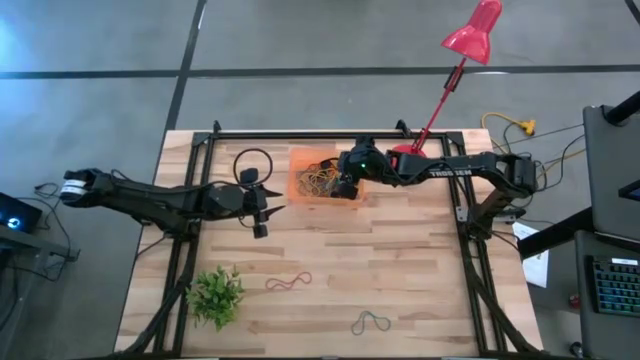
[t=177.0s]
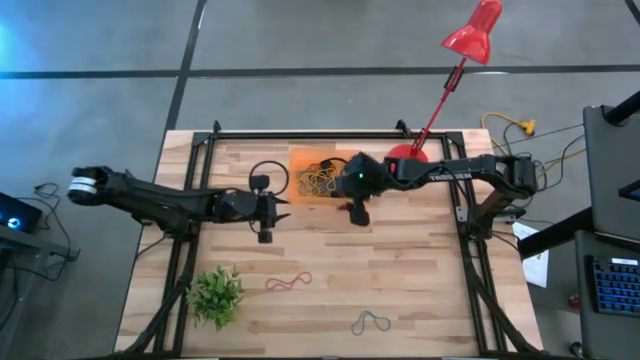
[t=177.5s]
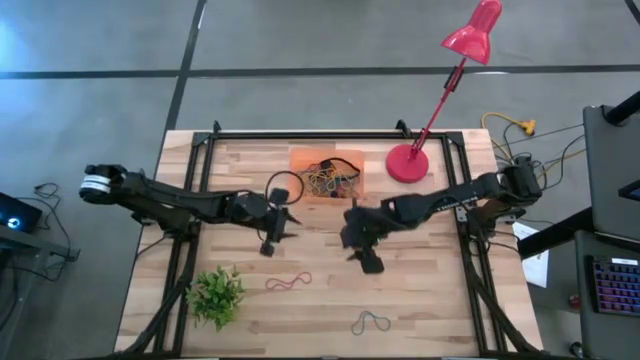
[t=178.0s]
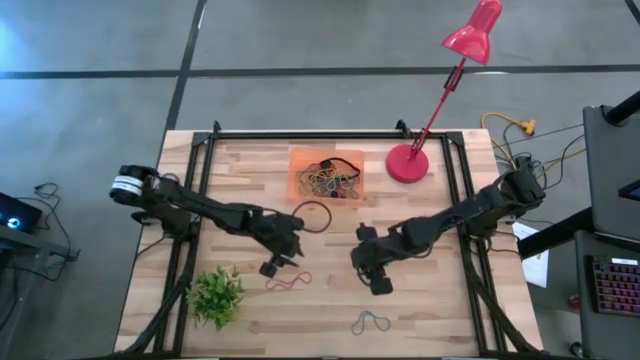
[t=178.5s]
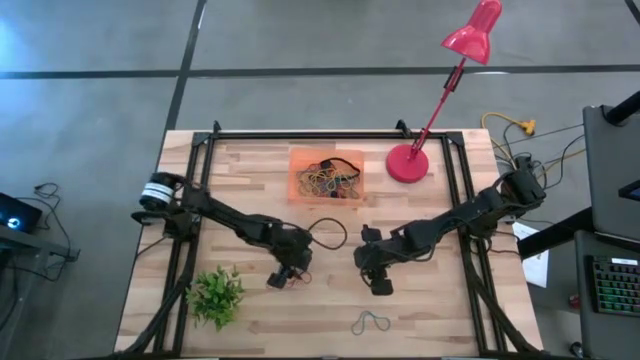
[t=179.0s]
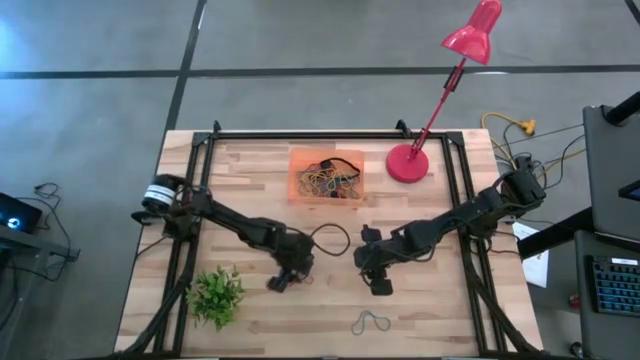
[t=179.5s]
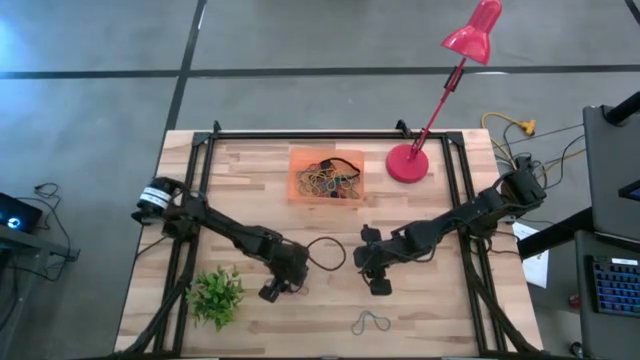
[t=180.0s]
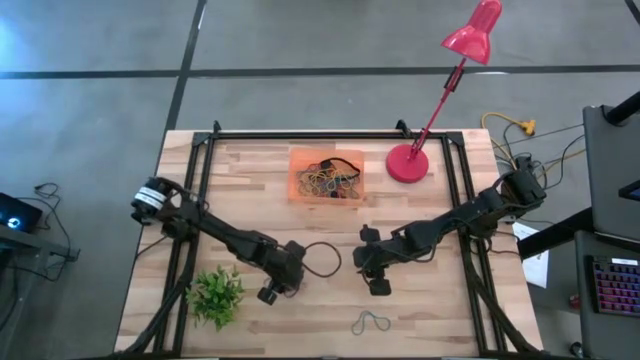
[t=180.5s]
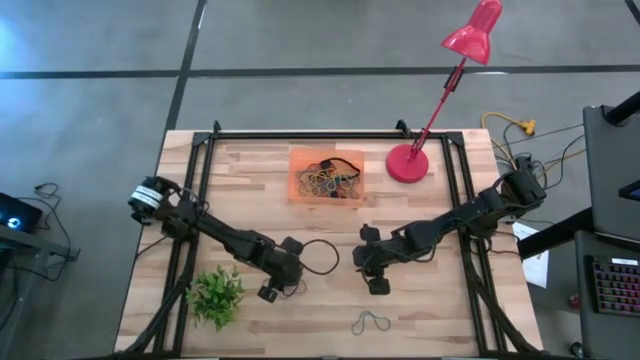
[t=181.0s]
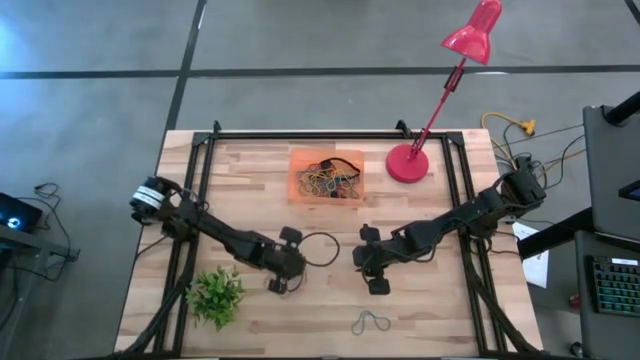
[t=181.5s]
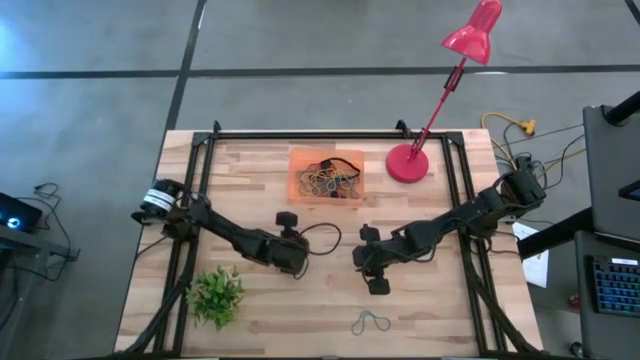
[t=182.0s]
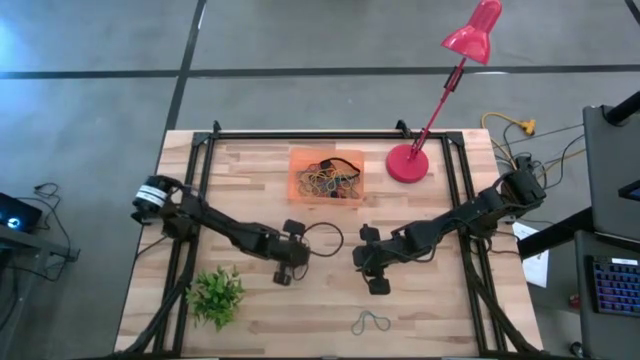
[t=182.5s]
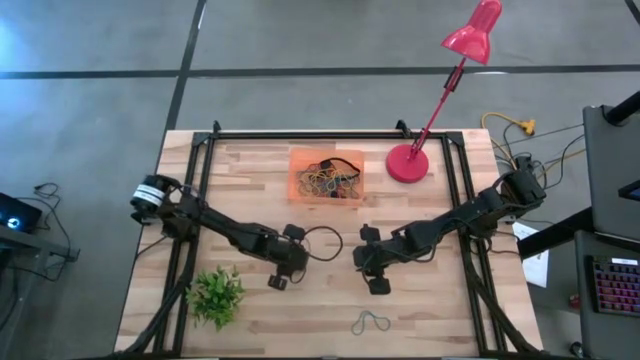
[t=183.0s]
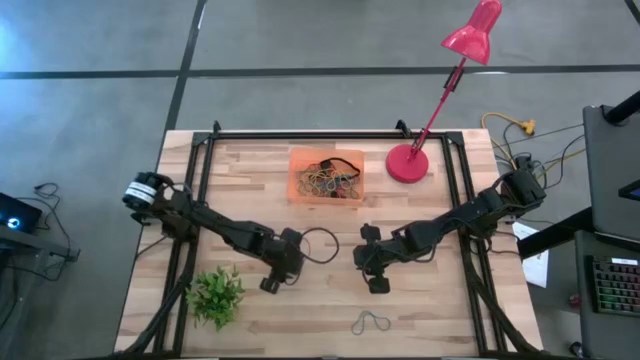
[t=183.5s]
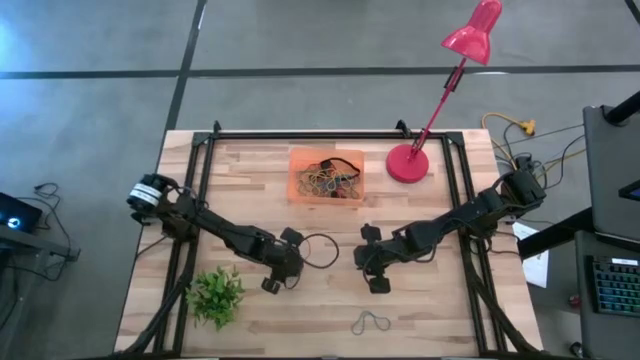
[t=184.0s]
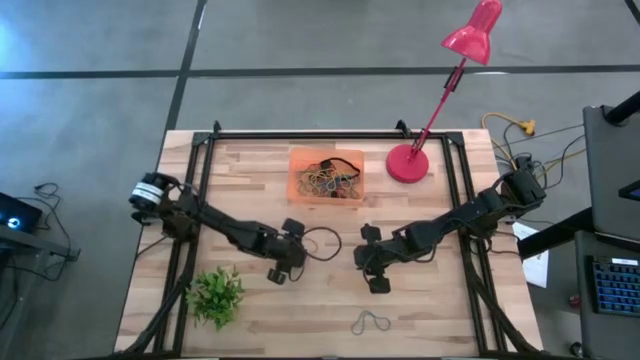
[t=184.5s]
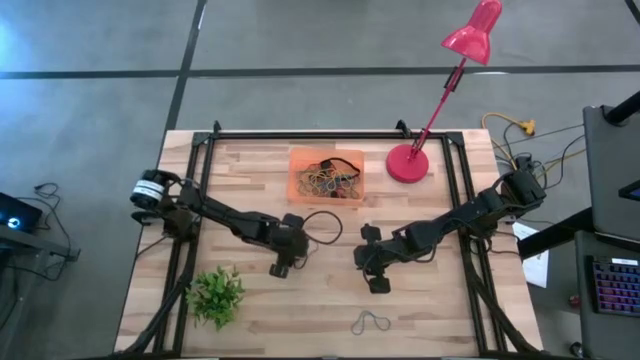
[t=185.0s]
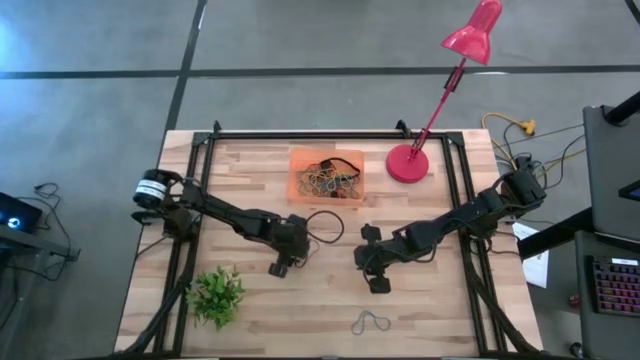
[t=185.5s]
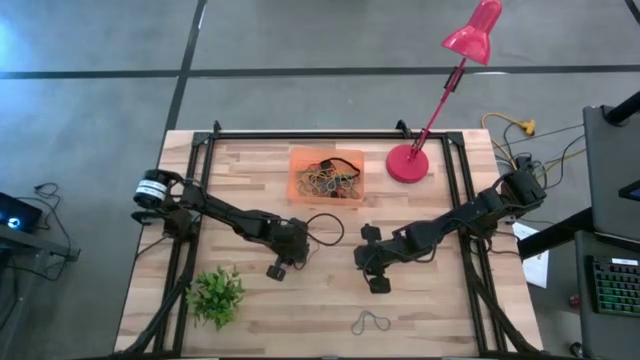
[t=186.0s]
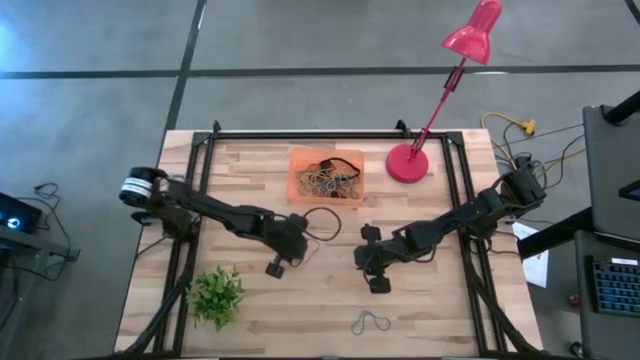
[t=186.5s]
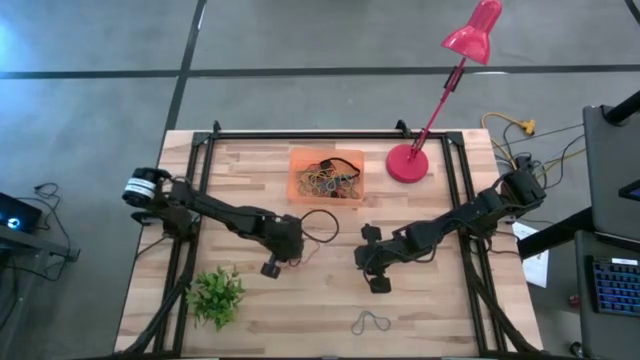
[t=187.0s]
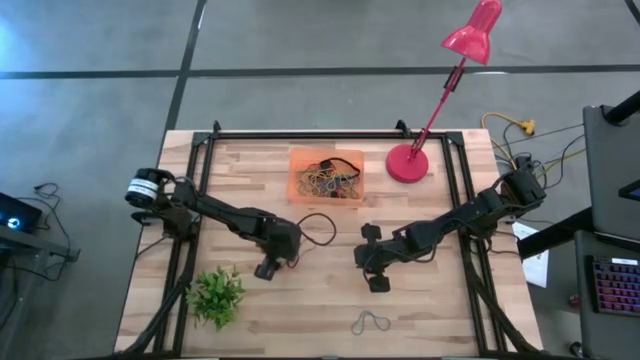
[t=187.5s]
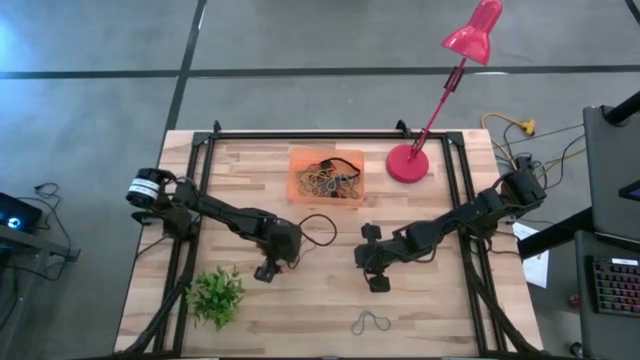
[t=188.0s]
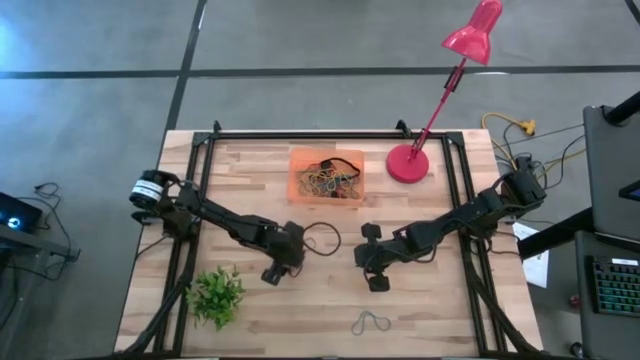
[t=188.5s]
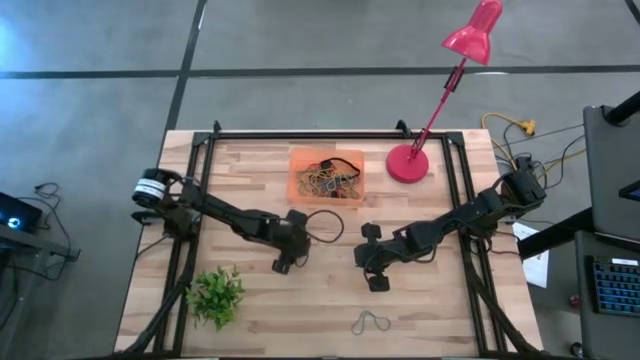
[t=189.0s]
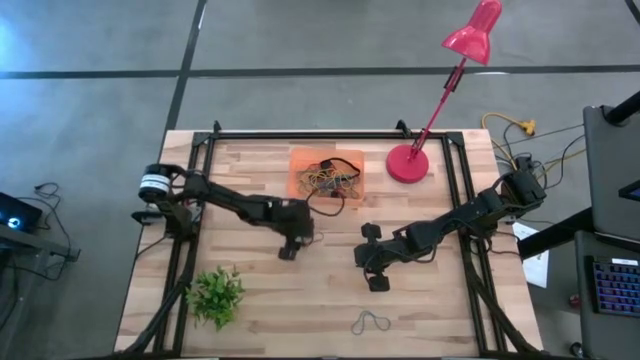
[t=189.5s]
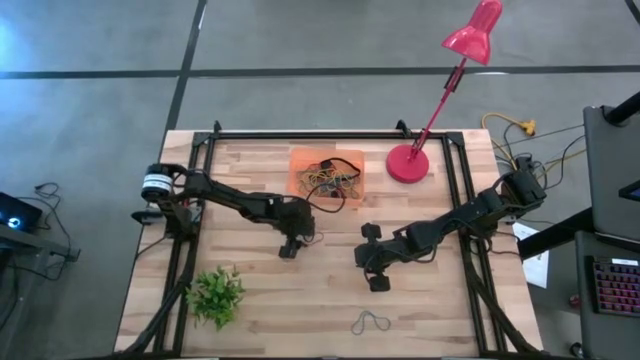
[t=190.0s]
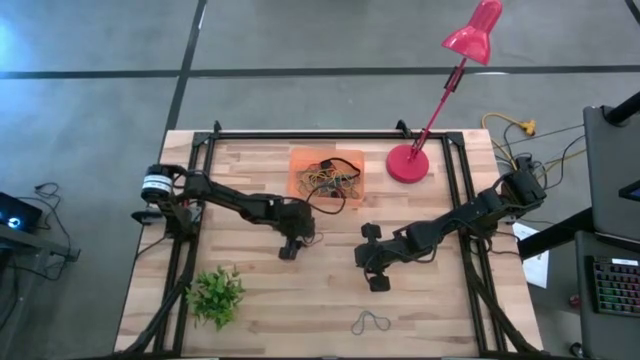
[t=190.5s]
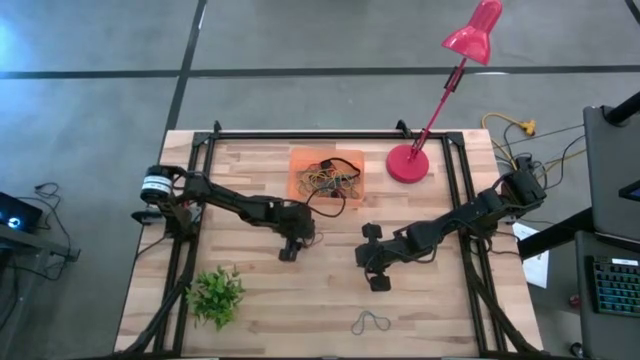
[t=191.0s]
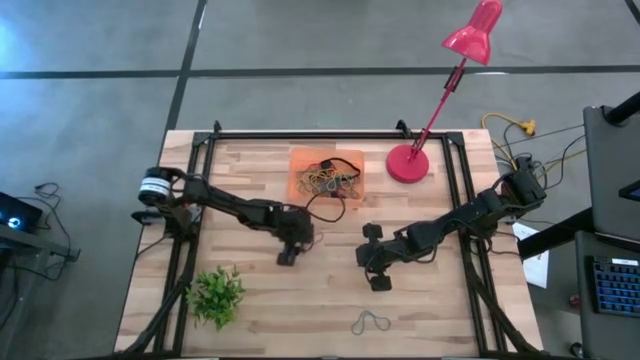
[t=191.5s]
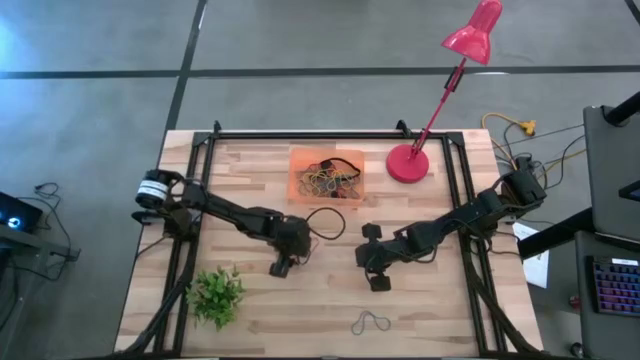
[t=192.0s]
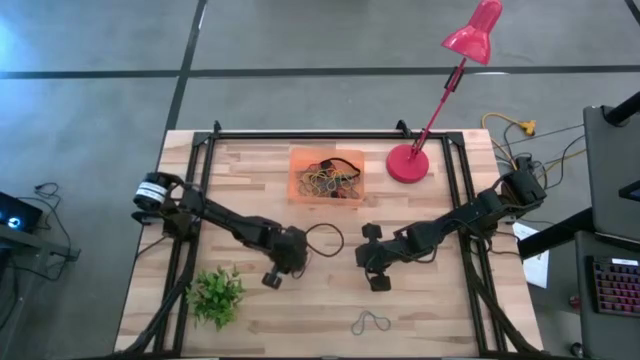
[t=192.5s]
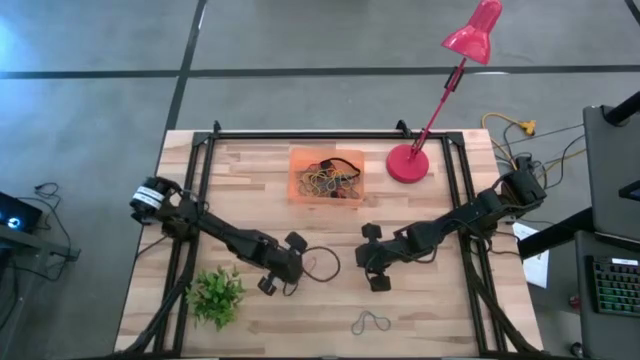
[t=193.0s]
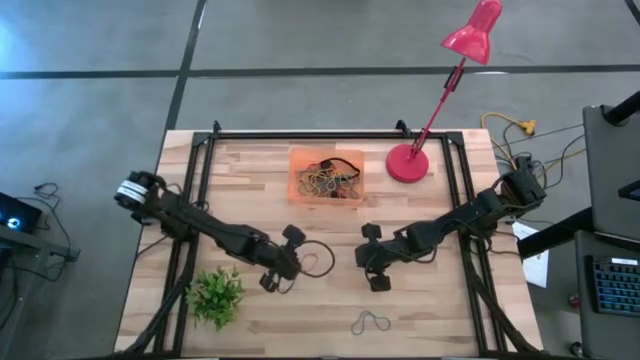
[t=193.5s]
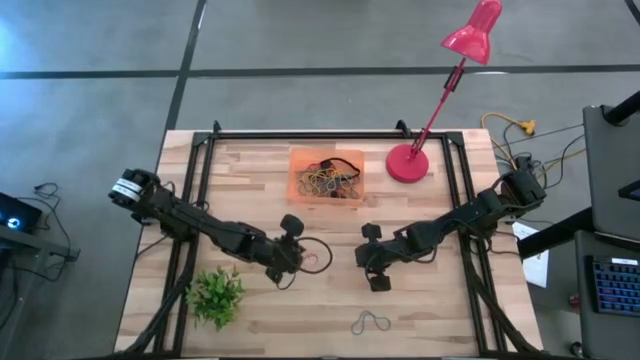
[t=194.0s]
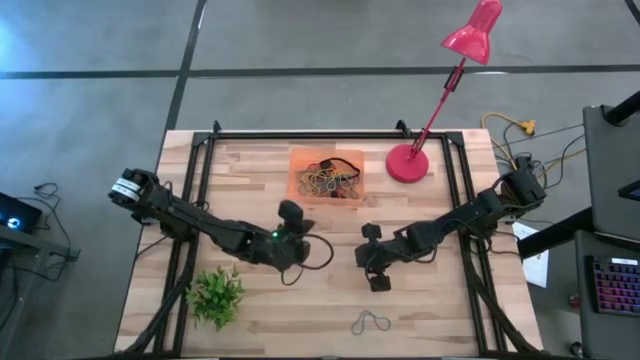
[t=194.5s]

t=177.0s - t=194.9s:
Task: Pick and place rubber bands into bin
Put the red rubber band into the orange bin

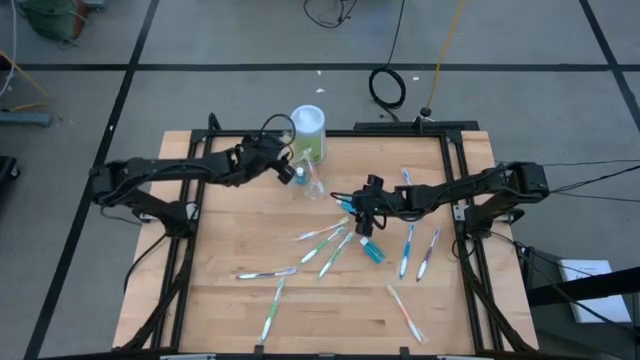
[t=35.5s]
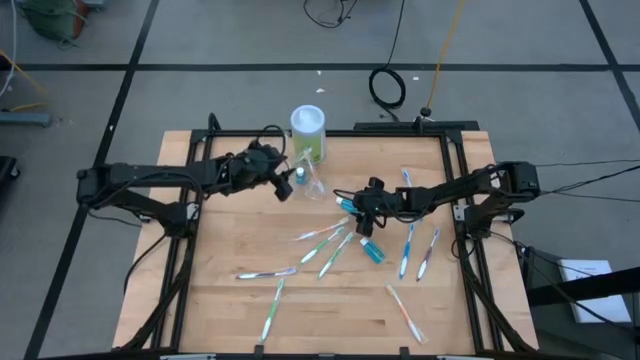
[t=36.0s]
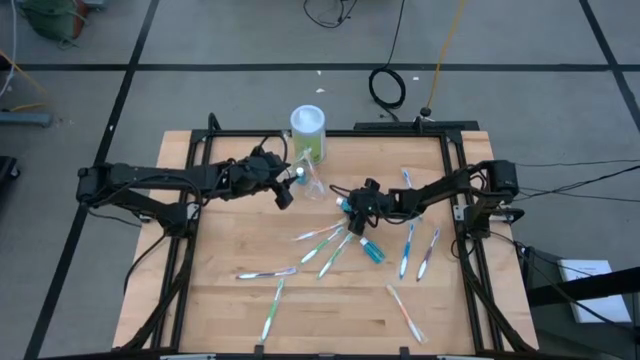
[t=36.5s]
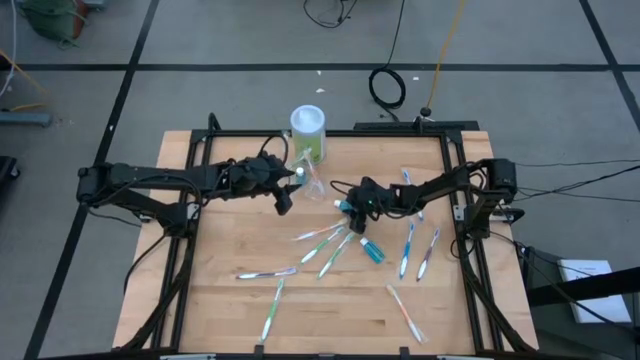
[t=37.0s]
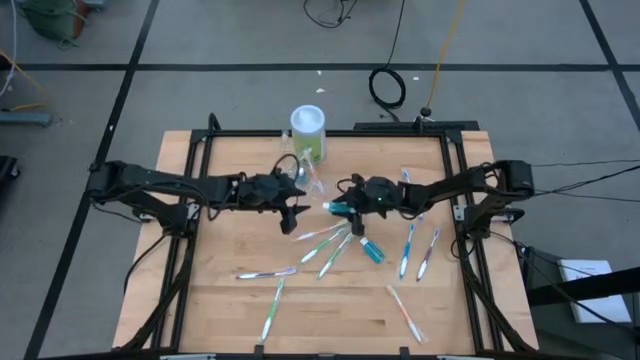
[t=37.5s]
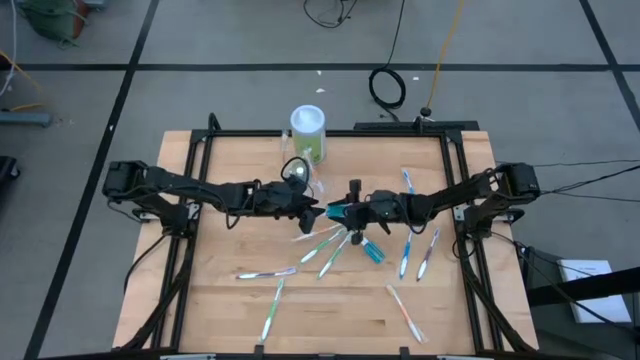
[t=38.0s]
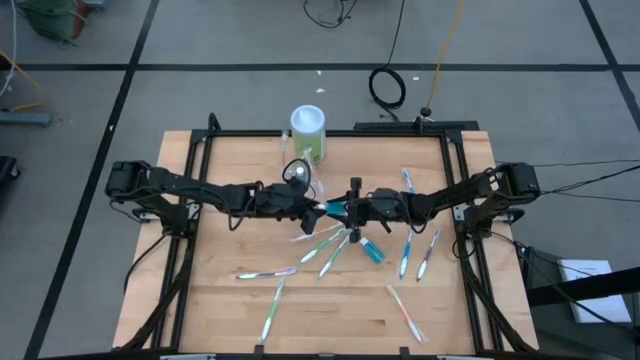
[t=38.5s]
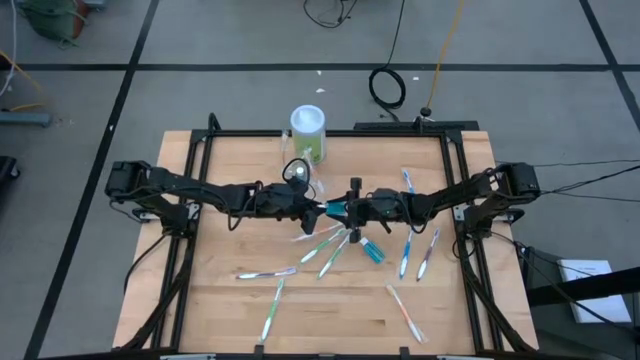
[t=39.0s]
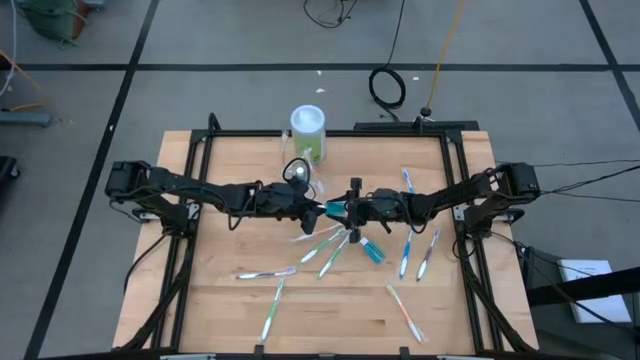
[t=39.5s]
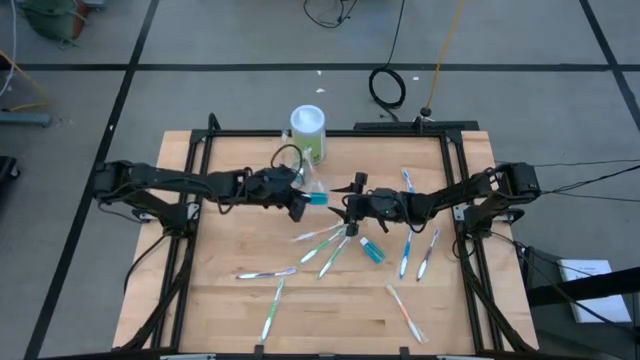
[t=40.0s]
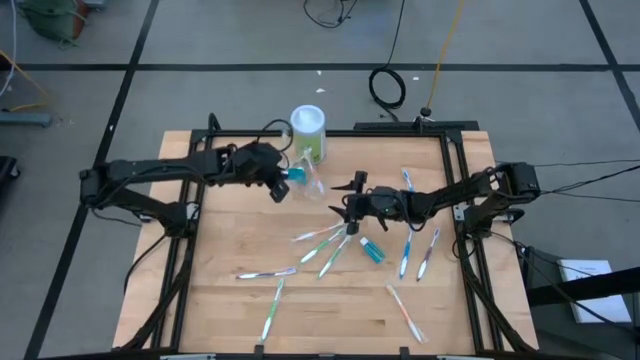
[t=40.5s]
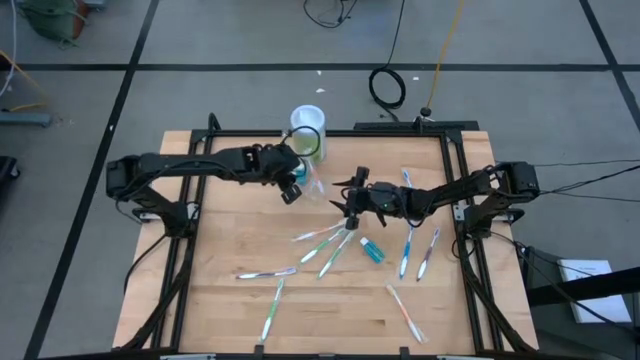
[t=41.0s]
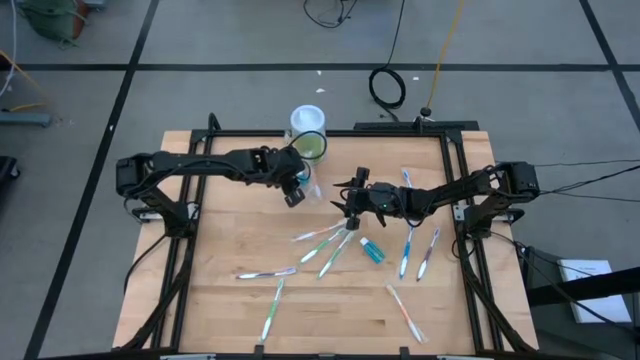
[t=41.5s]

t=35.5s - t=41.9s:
Task: Pick & Place toothbrushing station
Put the blue mouthwash bottle into the middle of the transparent organizer
